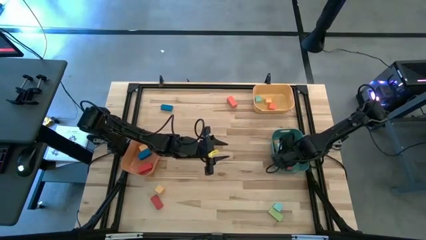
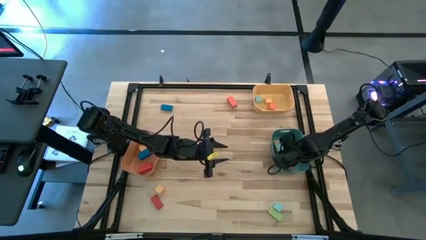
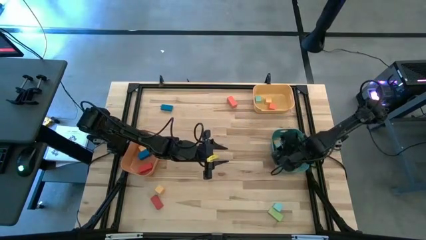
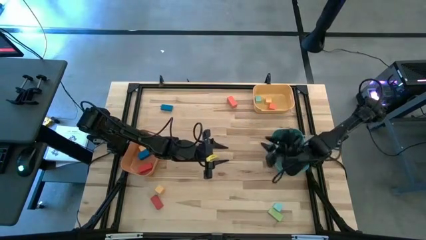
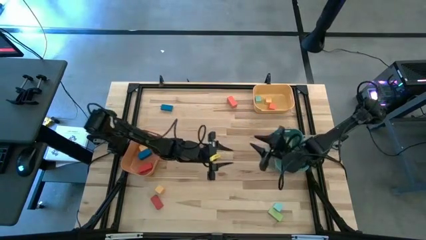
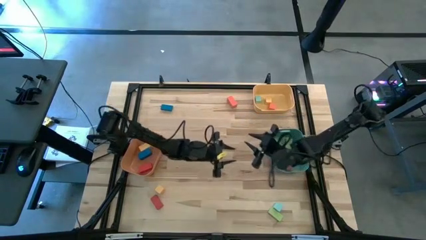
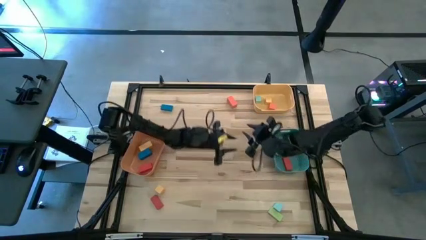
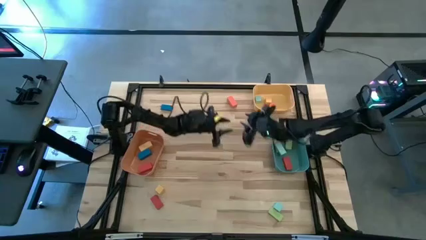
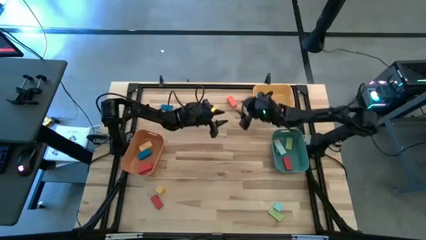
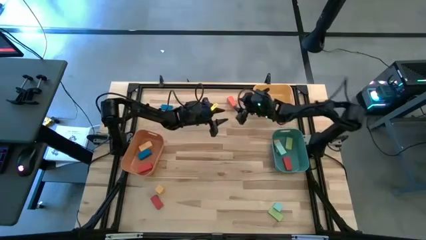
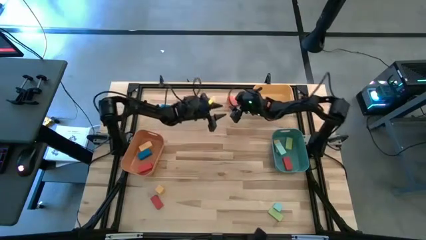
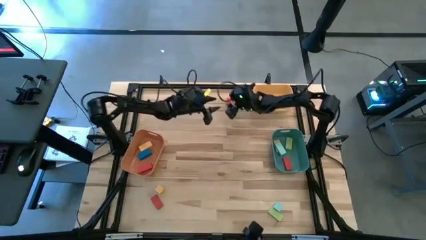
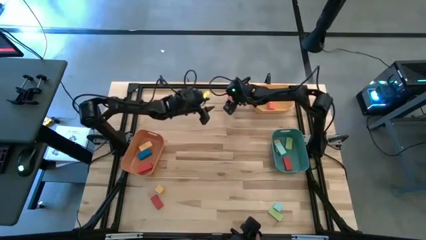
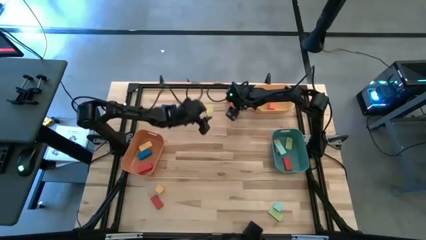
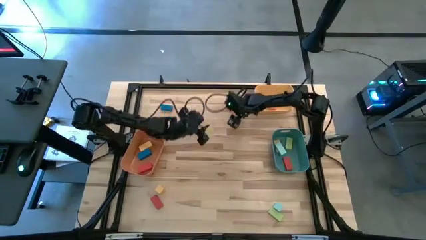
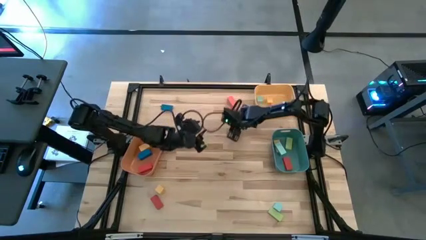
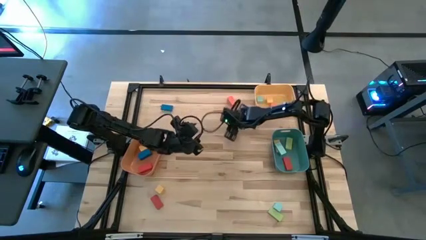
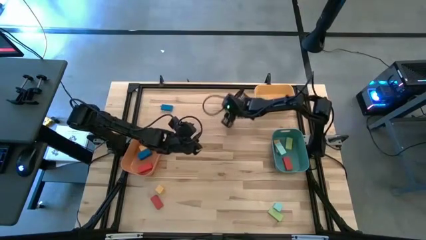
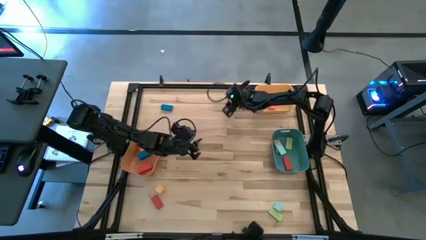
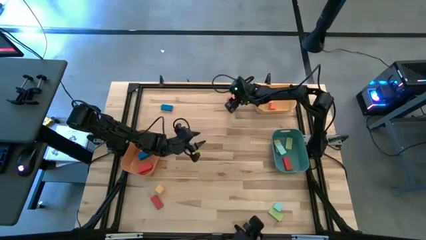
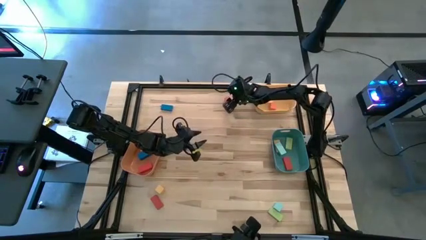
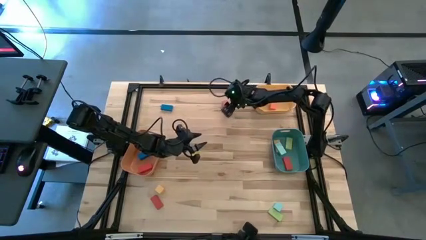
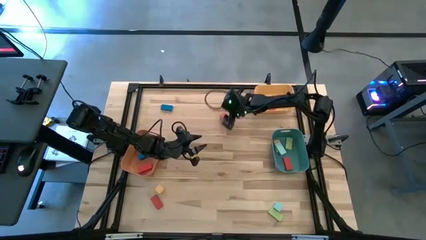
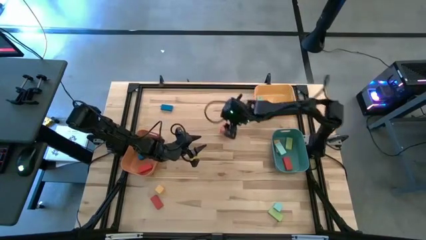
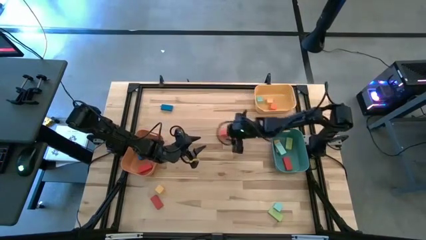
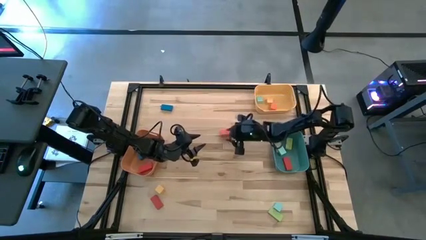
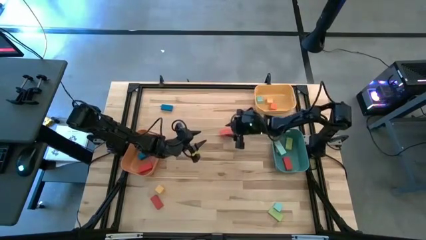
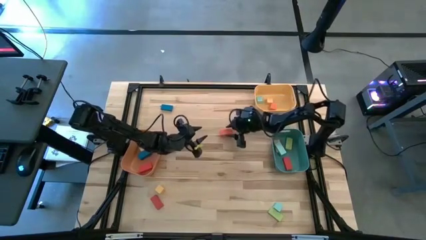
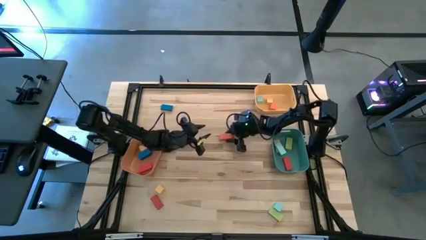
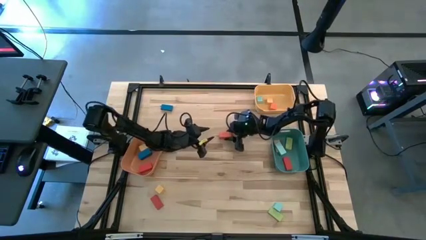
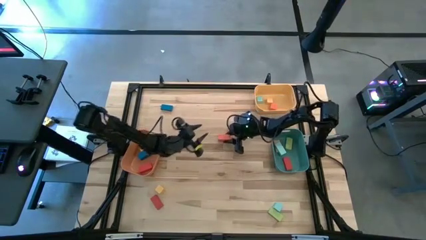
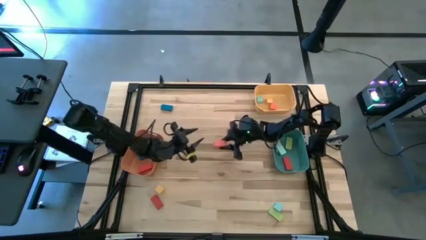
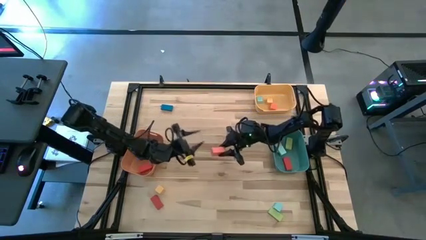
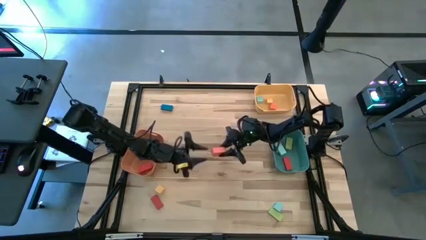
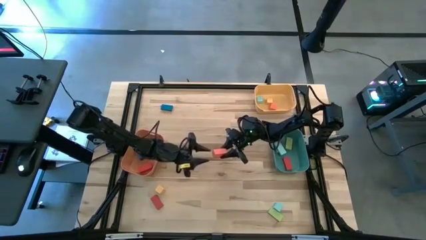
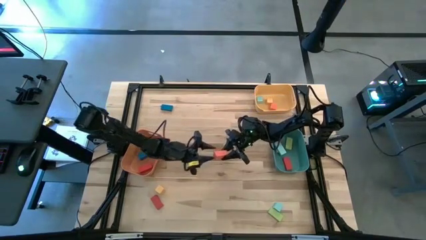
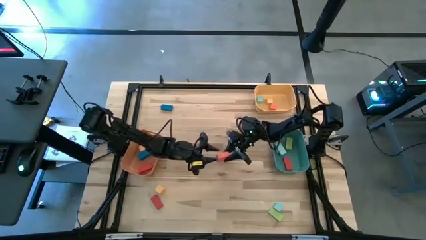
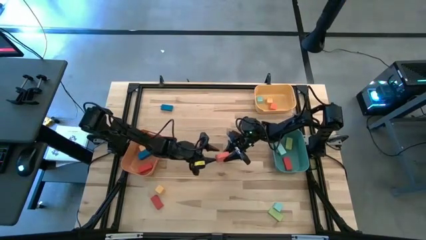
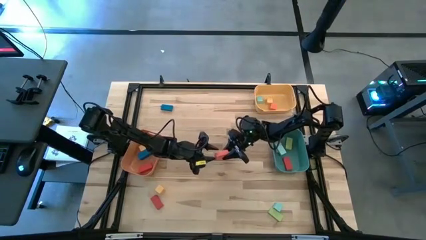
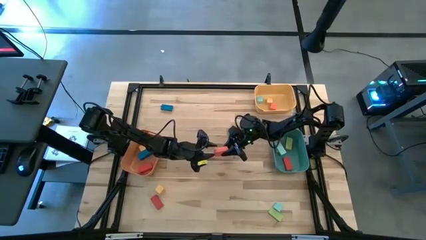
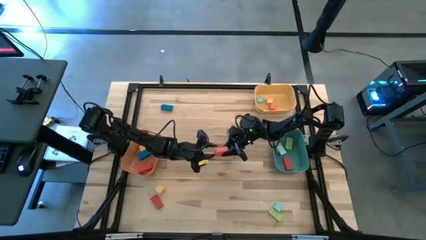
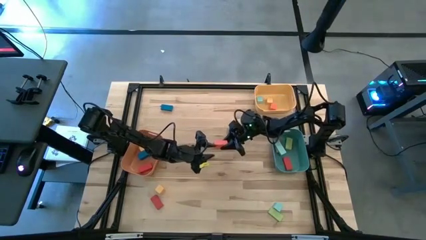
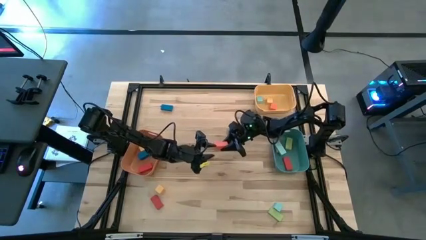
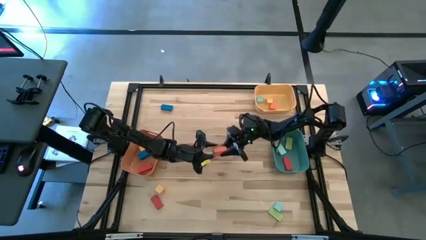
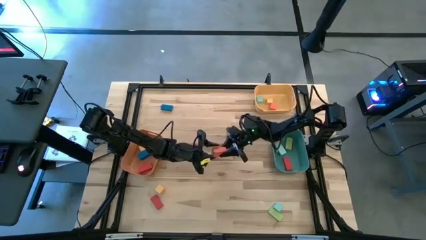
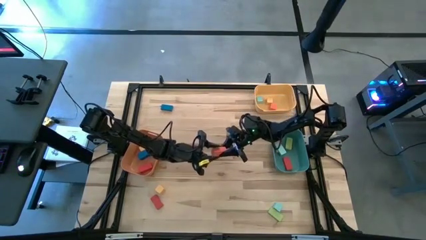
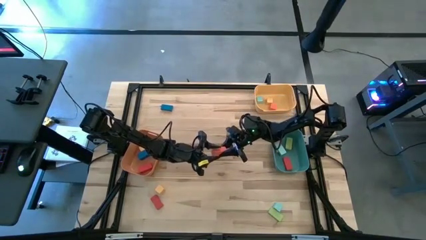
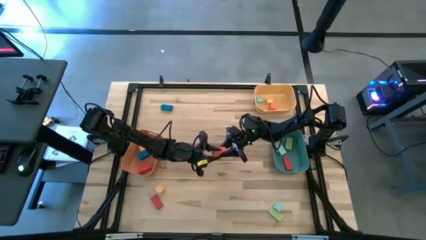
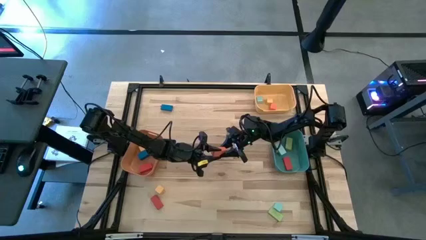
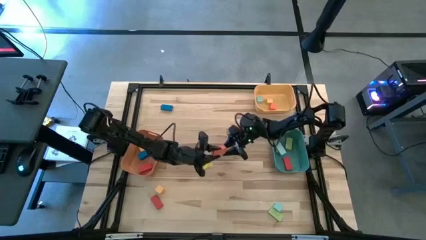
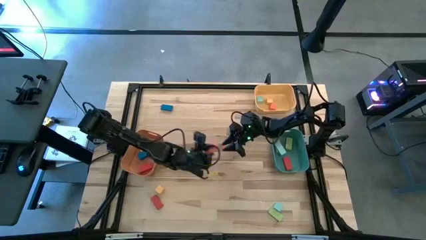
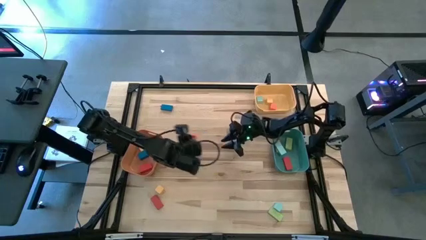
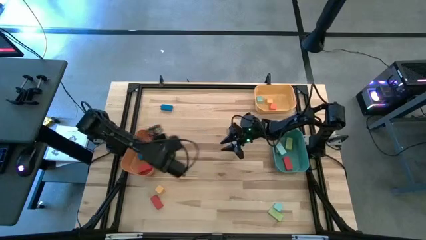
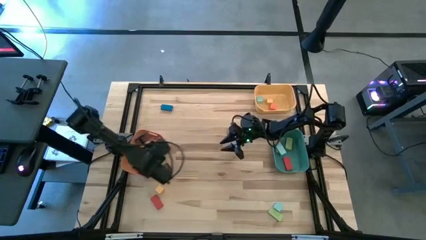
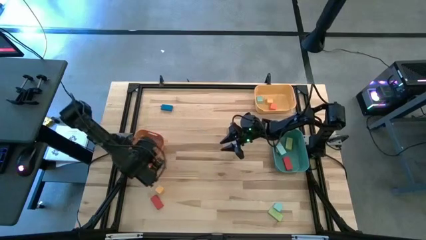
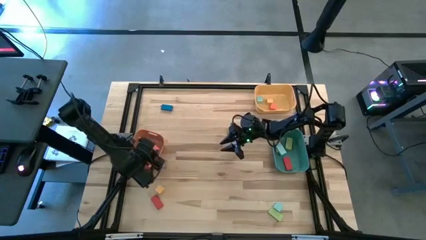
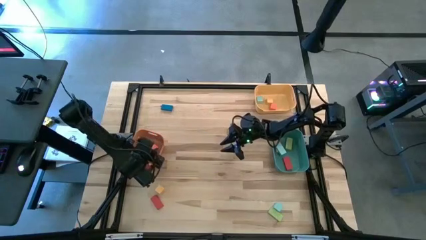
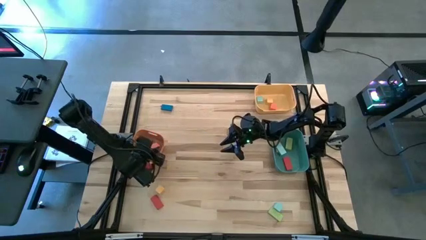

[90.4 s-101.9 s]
Task: Sort blocks by size
Put the thick orange rectangular block into the orange bin
